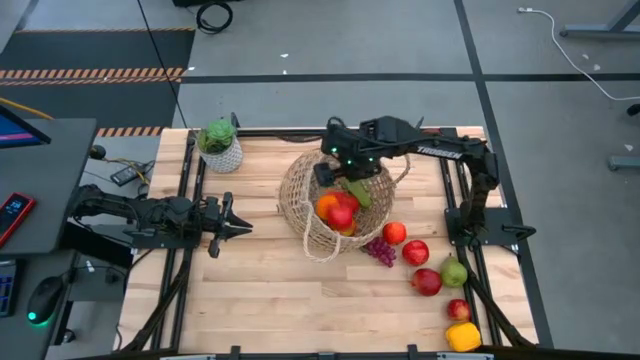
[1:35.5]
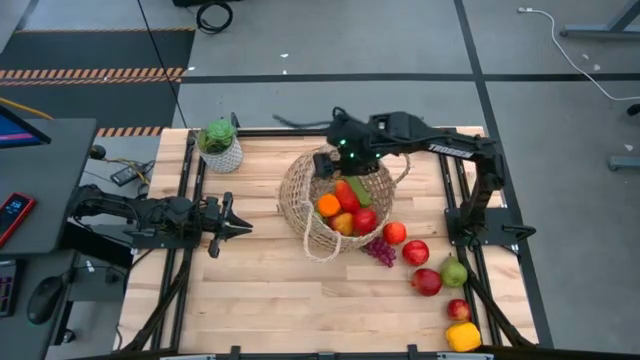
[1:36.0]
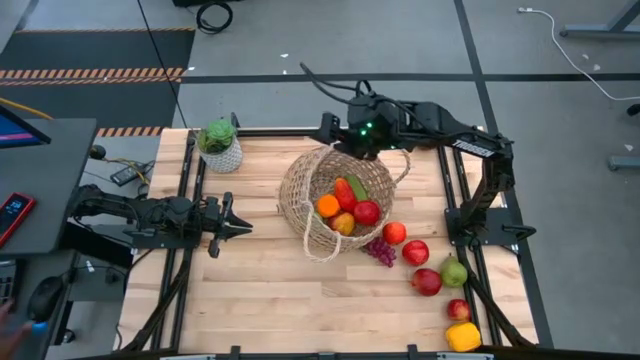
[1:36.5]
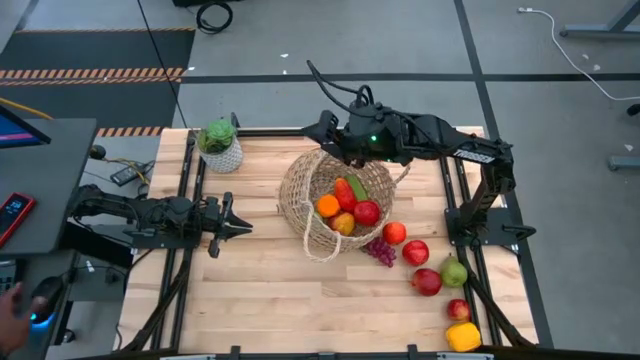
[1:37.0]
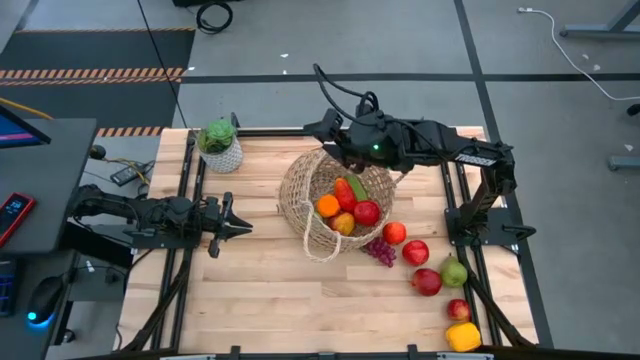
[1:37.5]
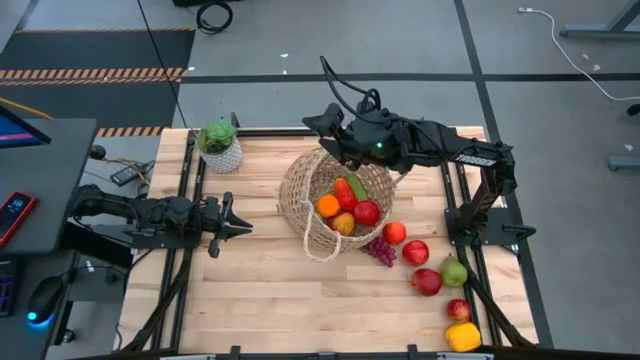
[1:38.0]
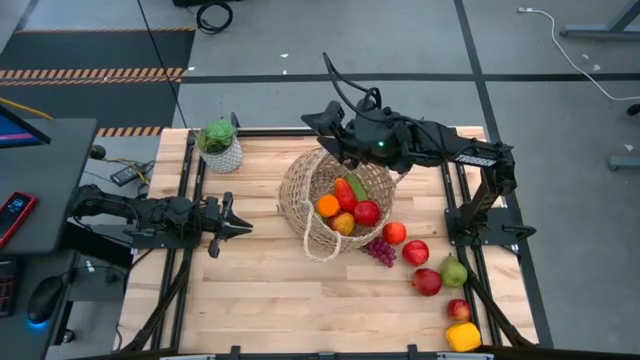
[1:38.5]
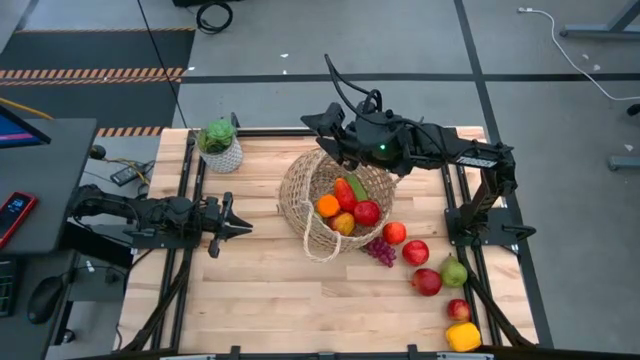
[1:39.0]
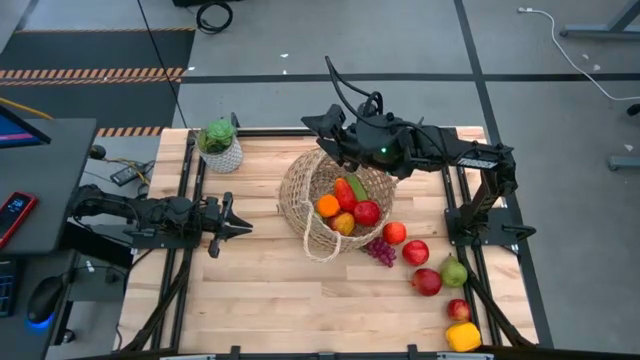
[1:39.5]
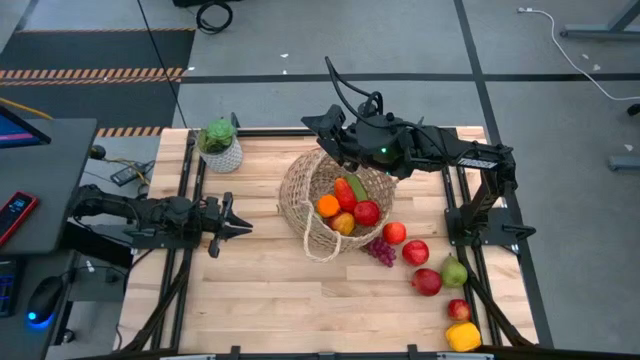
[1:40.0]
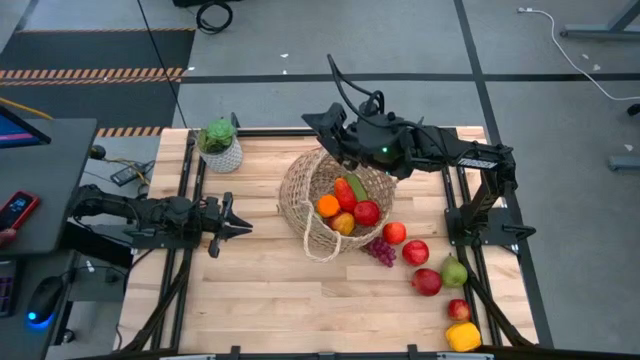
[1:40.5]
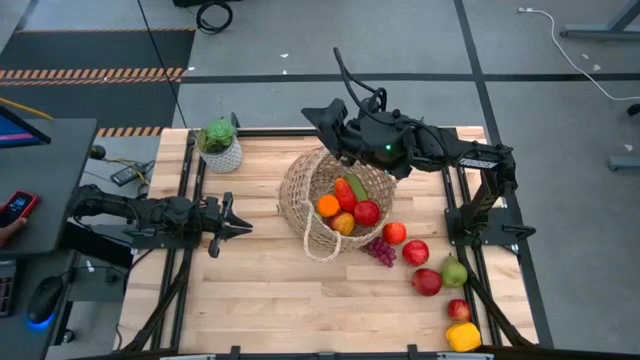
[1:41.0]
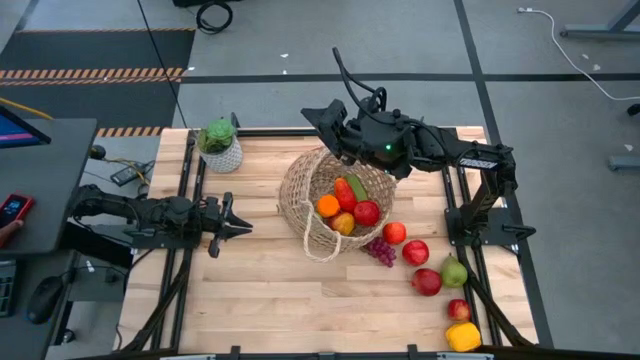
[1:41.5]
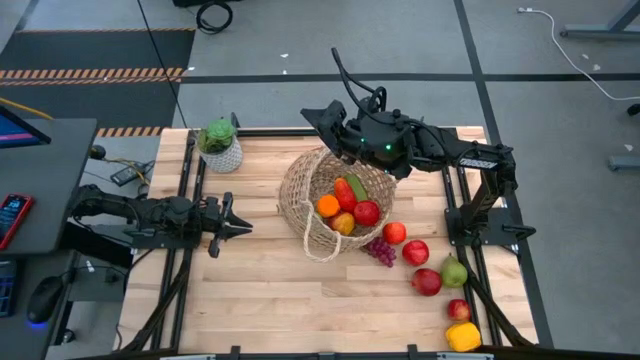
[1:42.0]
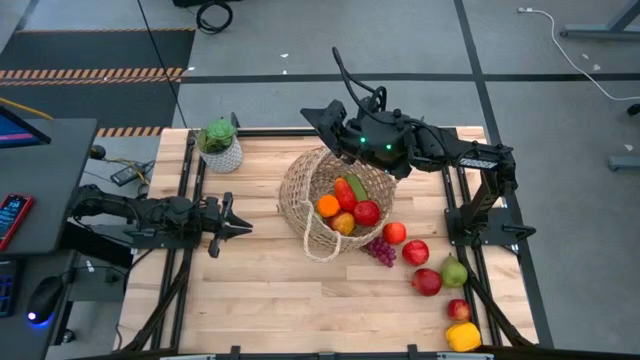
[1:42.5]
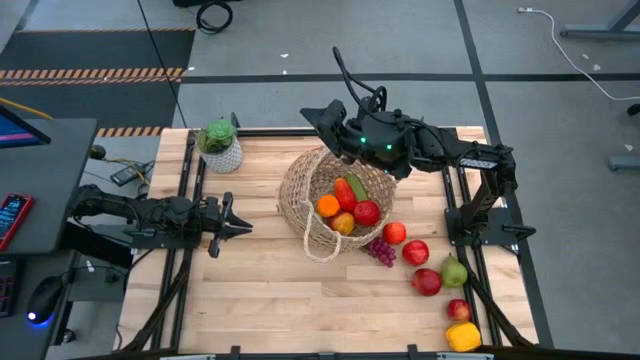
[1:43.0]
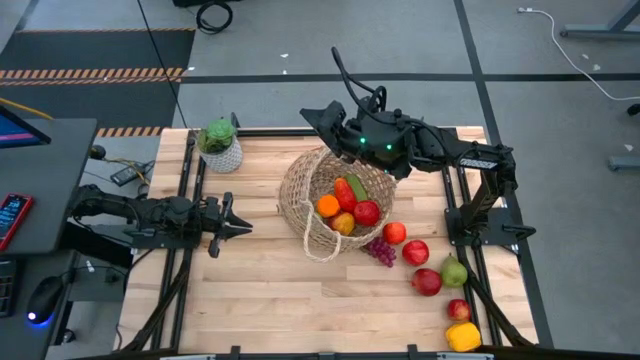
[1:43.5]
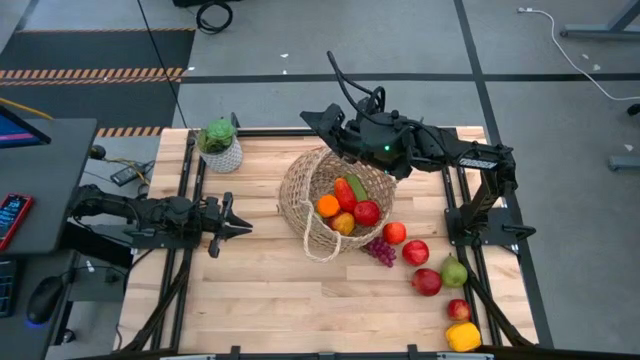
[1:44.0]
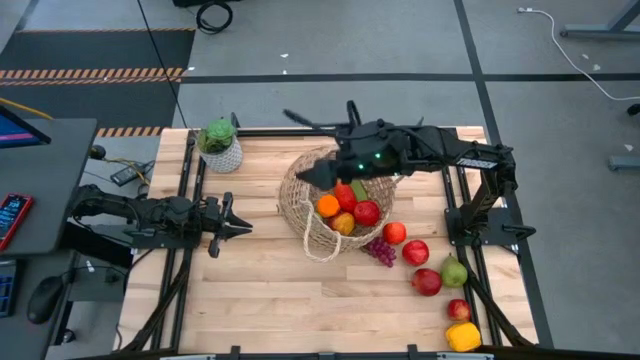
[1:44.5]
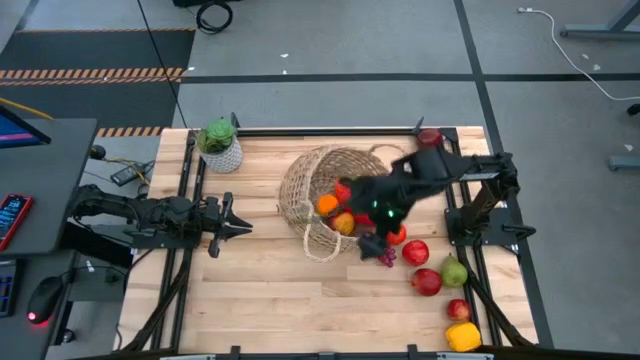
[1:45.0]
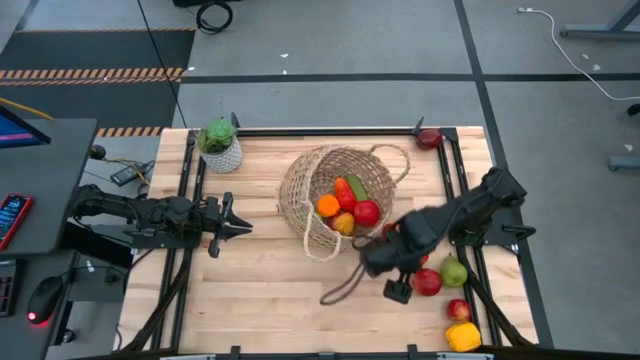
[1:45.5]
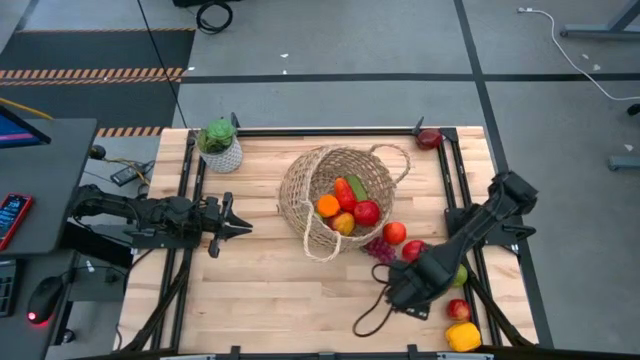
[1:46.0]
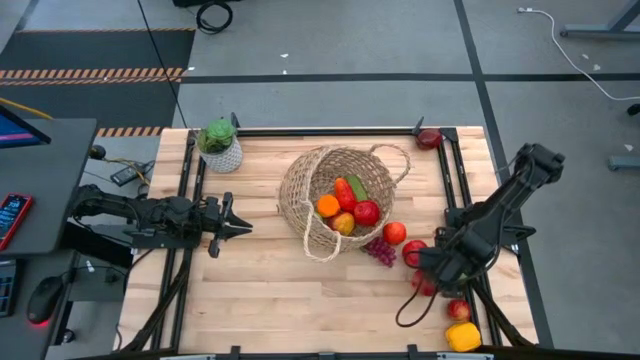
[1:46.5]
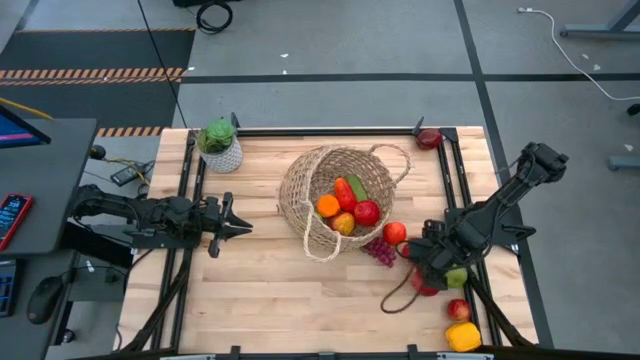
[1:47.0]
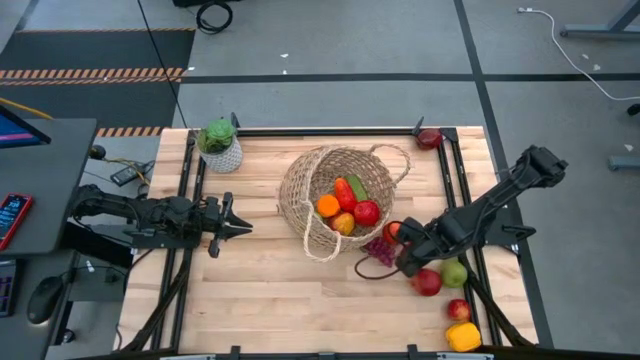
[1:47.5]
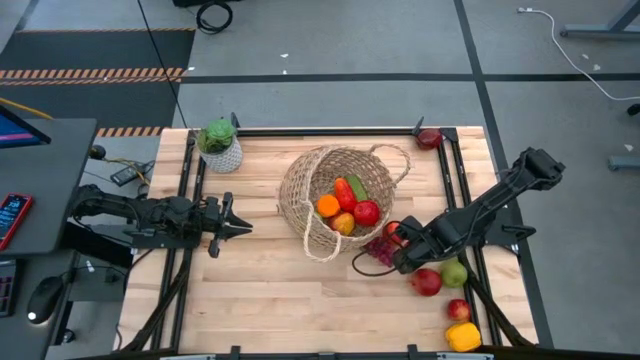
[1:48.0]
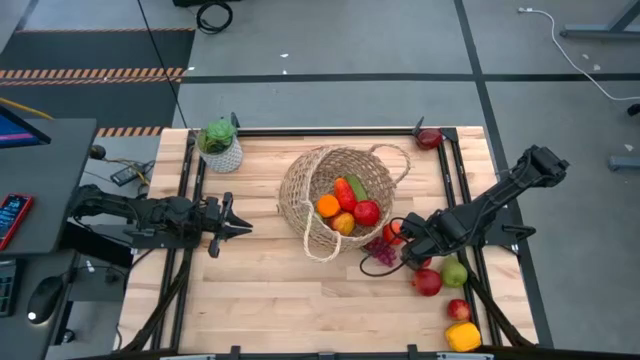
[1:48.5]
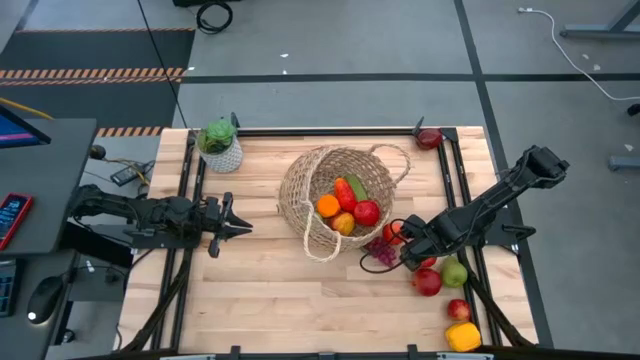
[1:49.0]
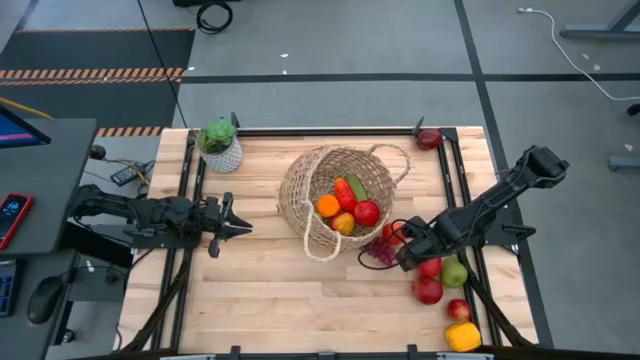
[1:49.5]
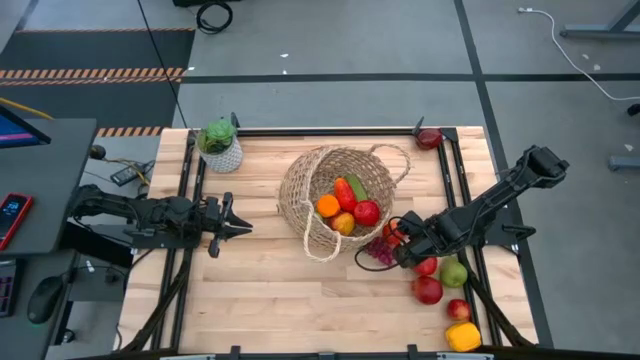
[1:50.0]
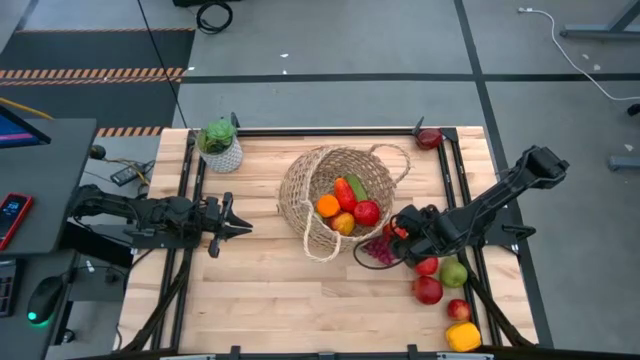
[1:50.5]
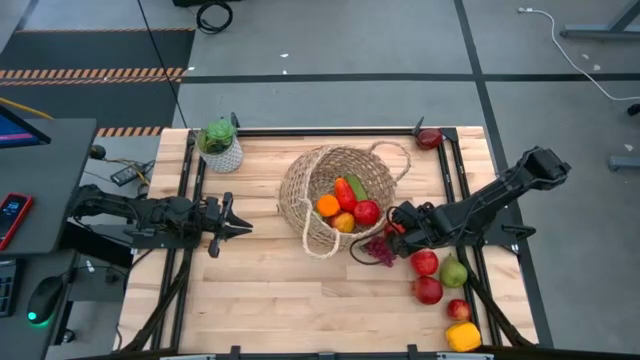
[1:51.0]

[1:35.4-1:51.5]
Task: Build produce basket
Put the red apple into the woven basket

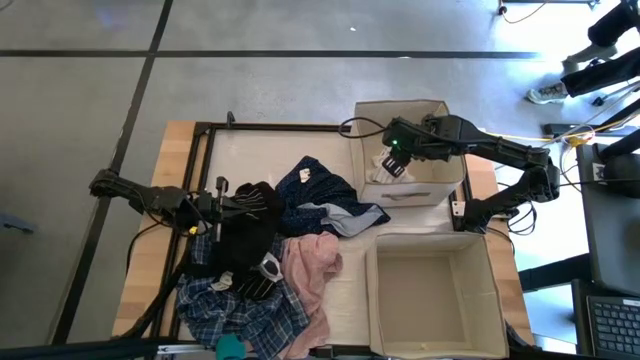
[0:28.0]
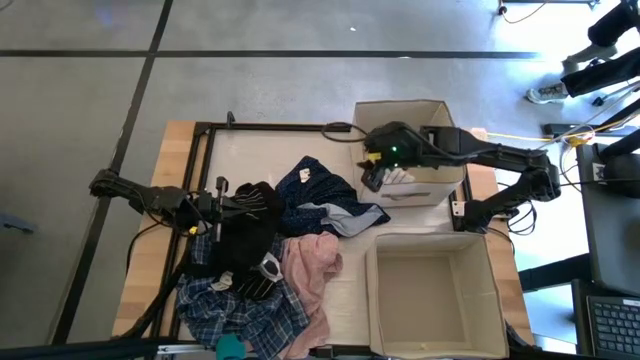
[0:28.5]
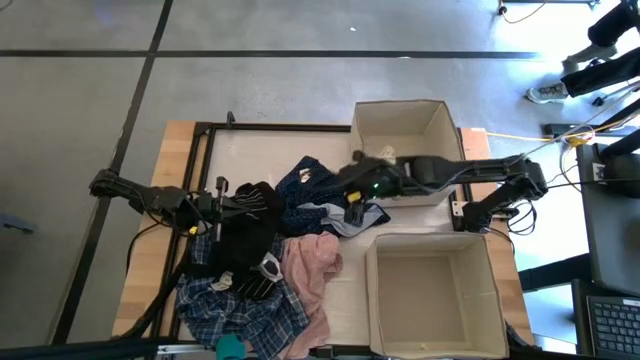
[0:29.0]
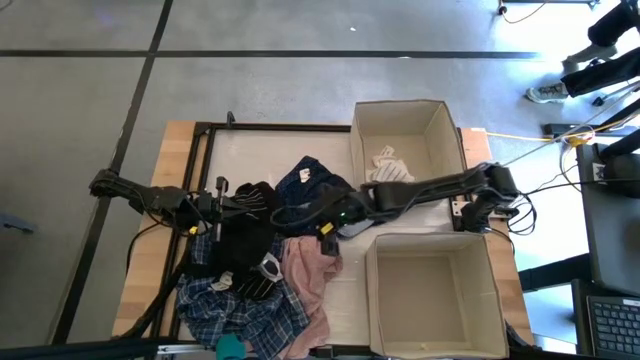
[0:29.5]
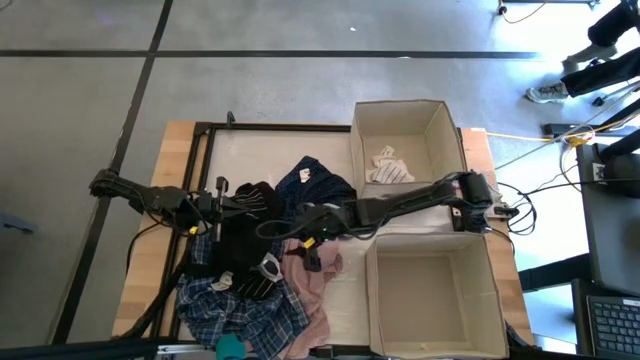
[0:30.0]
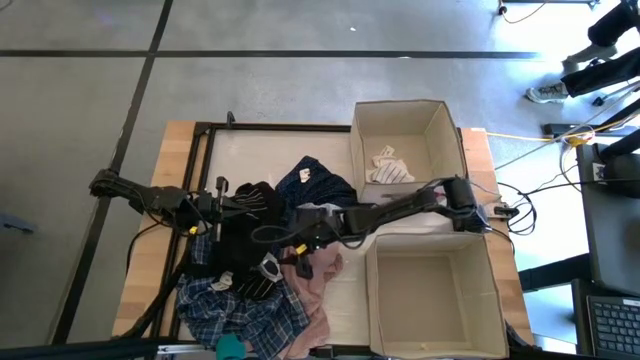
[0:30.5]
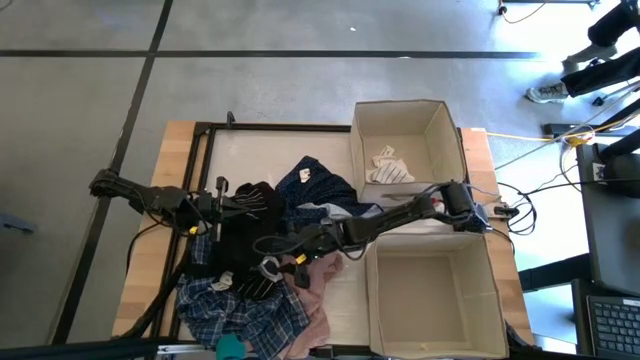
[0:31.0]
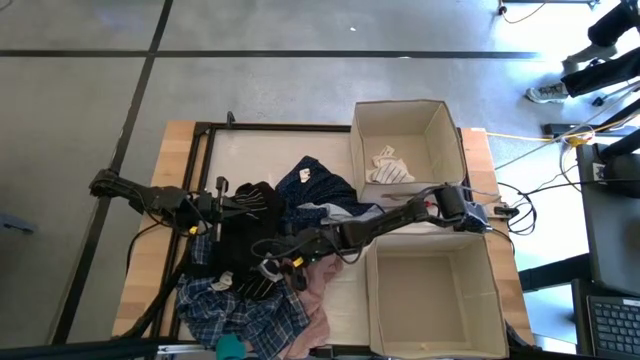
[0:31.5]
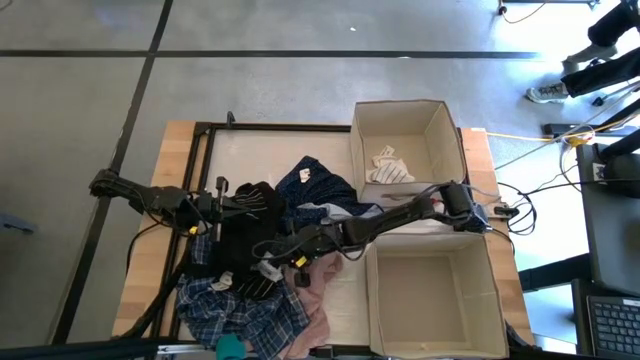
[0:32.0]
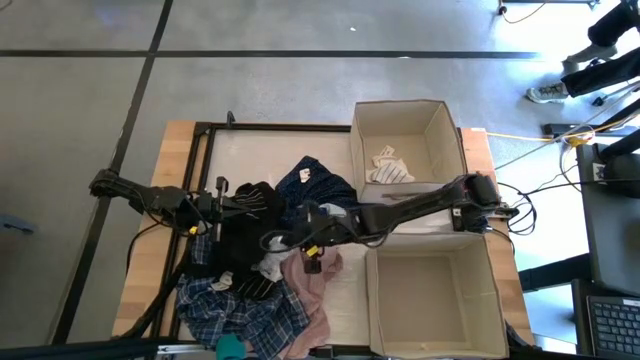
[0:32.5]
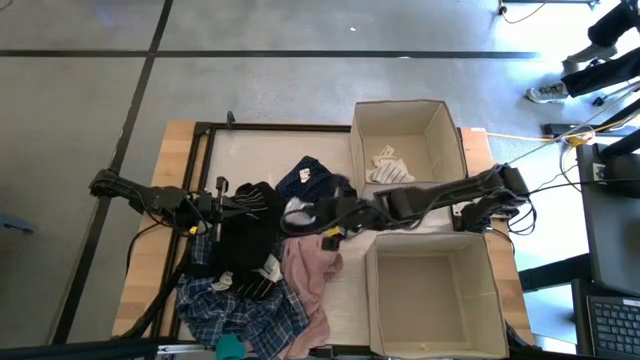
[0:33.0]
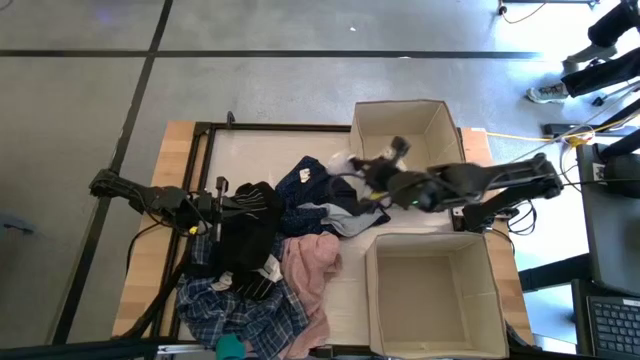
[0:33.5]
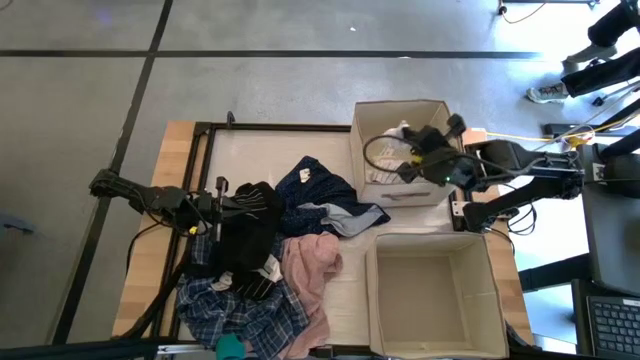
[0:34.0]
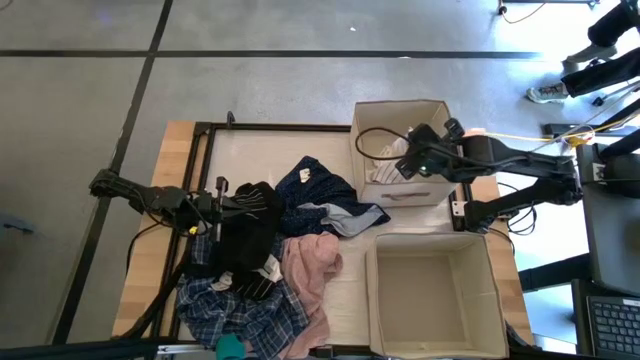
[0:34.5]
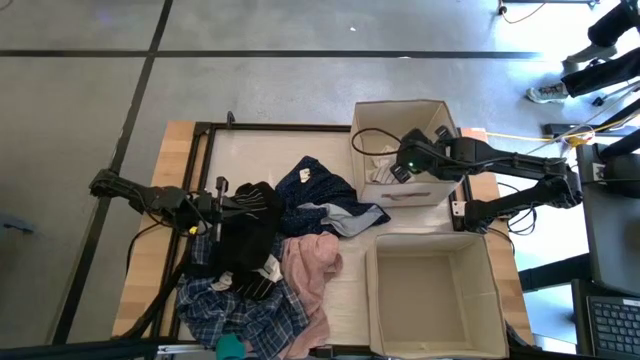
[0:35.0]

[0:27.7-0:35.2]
Task: Sort clothes
Put the white striped sock into the top laundry organizer
